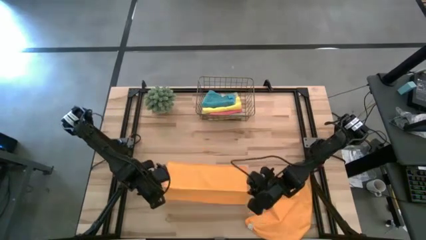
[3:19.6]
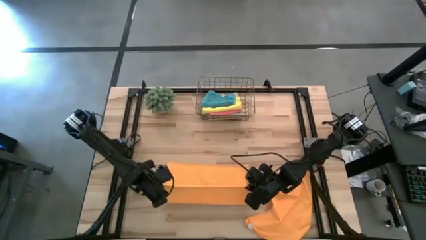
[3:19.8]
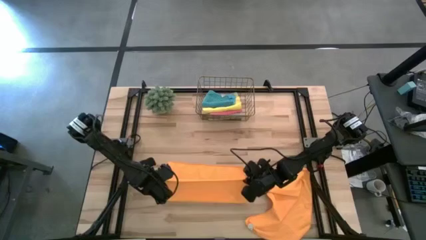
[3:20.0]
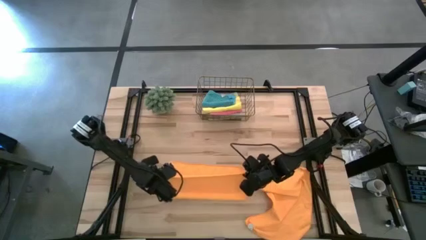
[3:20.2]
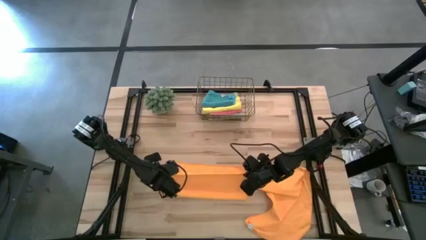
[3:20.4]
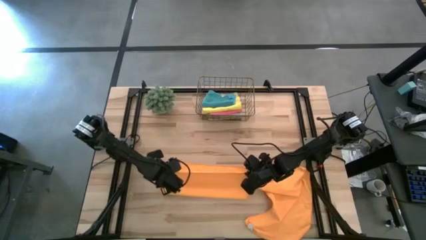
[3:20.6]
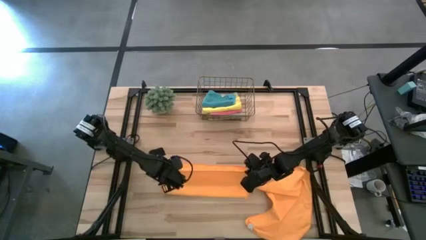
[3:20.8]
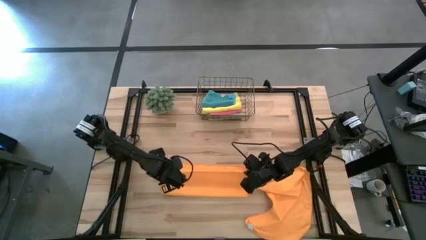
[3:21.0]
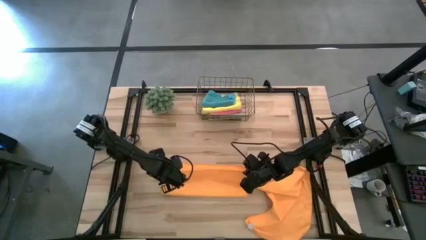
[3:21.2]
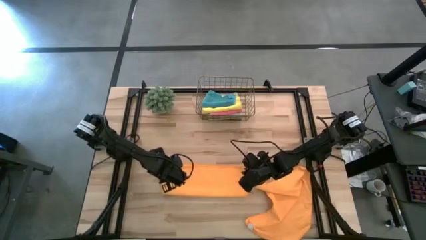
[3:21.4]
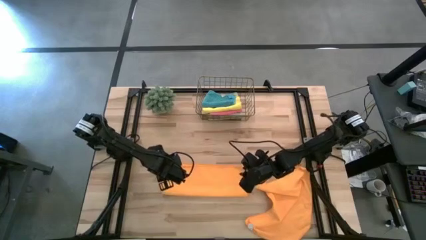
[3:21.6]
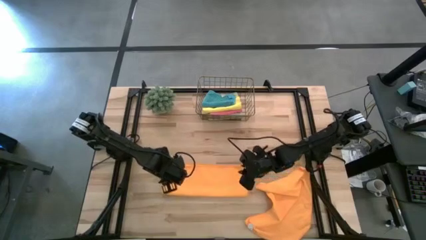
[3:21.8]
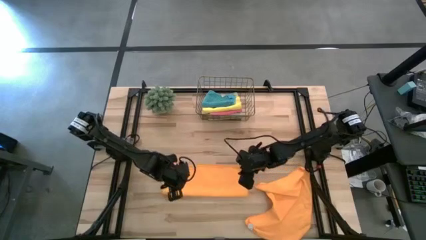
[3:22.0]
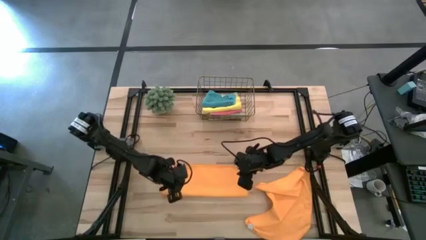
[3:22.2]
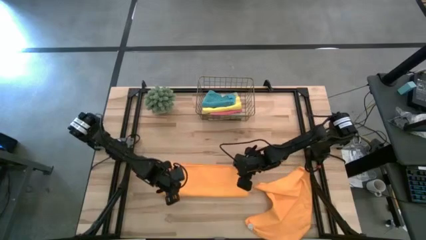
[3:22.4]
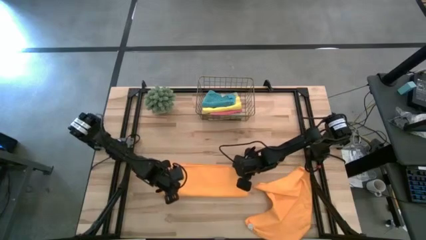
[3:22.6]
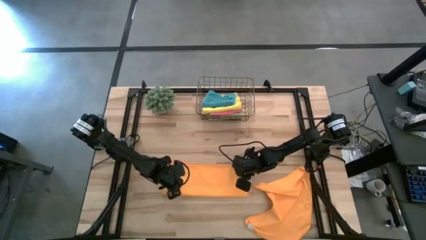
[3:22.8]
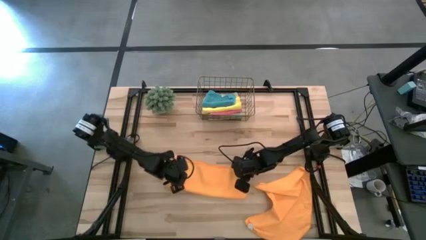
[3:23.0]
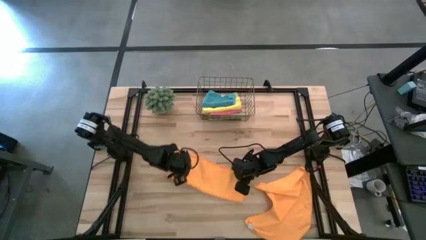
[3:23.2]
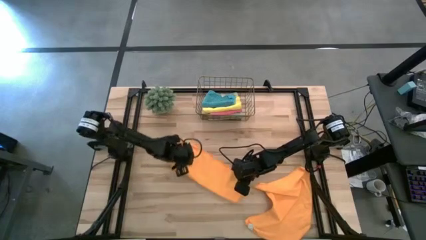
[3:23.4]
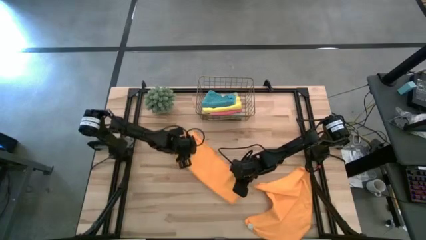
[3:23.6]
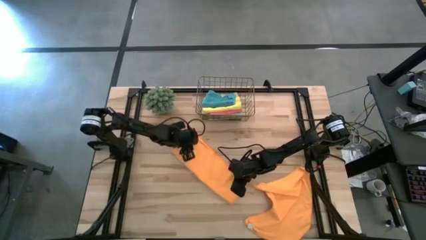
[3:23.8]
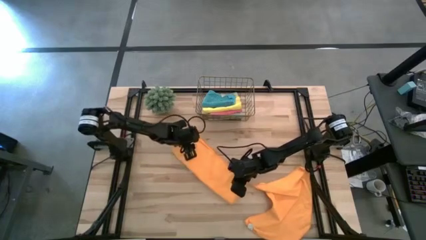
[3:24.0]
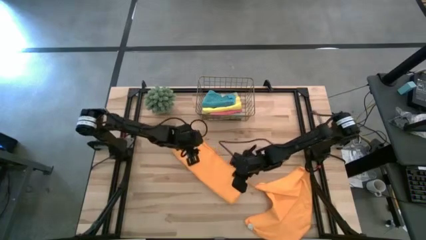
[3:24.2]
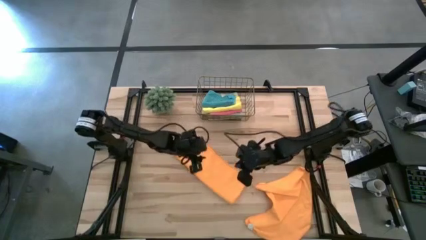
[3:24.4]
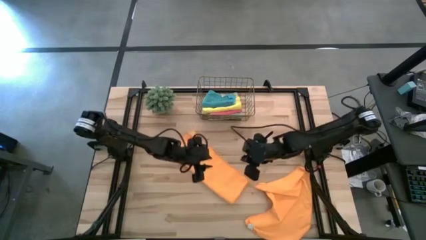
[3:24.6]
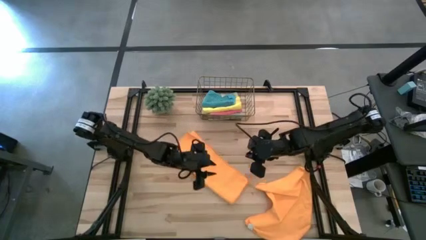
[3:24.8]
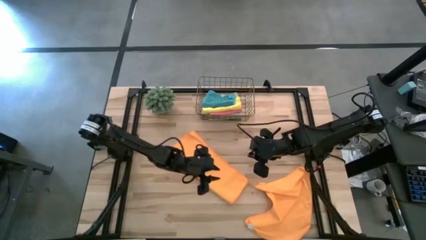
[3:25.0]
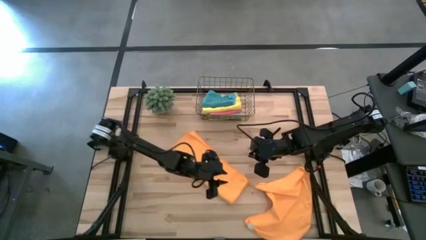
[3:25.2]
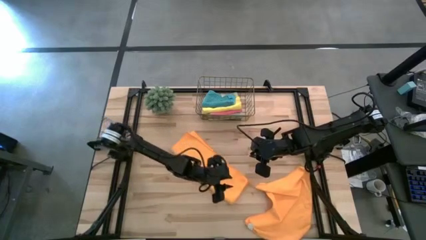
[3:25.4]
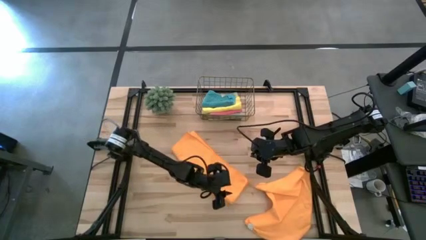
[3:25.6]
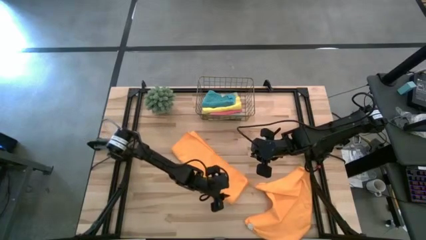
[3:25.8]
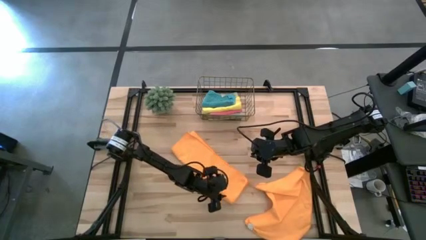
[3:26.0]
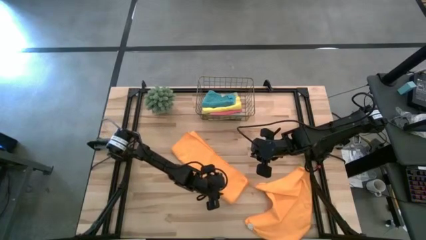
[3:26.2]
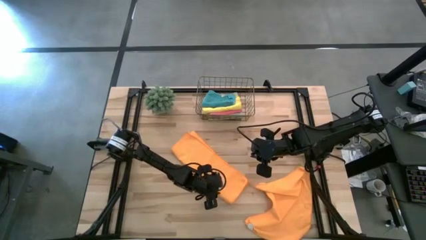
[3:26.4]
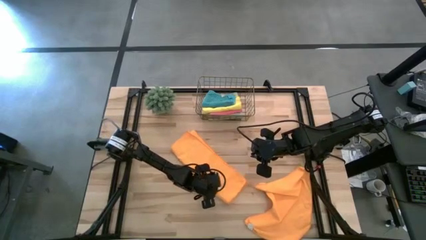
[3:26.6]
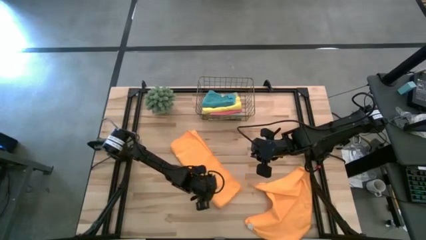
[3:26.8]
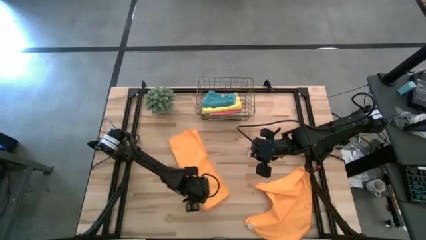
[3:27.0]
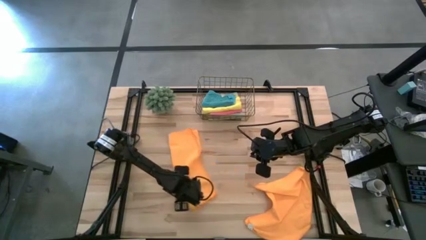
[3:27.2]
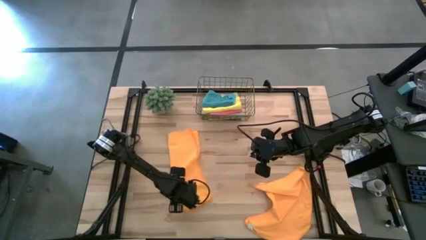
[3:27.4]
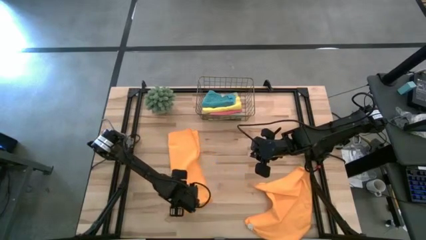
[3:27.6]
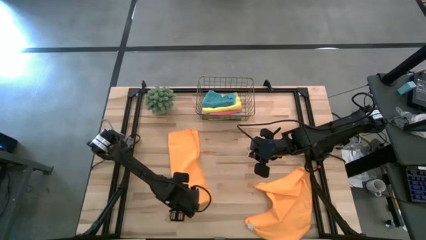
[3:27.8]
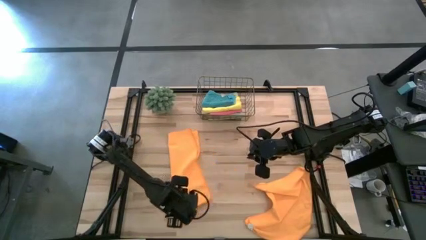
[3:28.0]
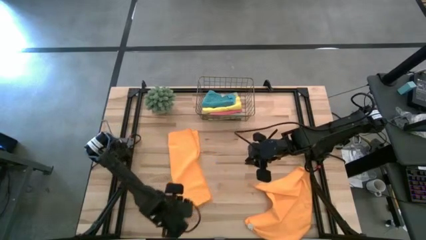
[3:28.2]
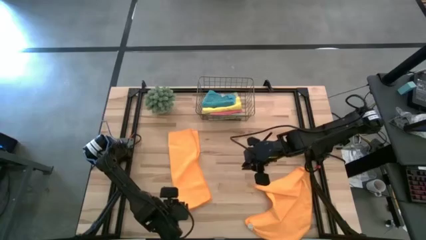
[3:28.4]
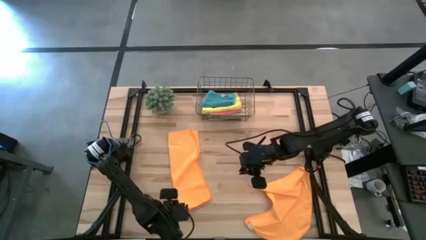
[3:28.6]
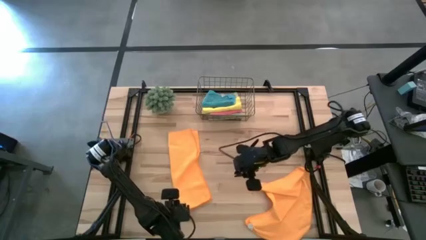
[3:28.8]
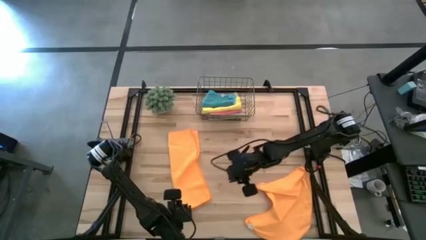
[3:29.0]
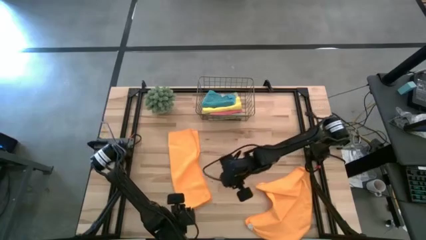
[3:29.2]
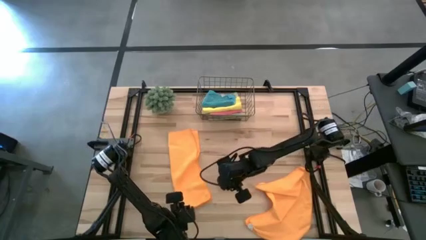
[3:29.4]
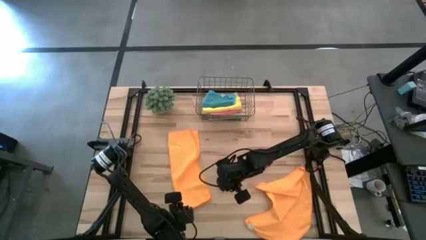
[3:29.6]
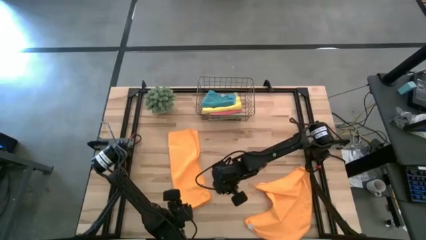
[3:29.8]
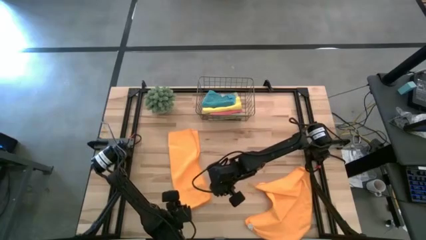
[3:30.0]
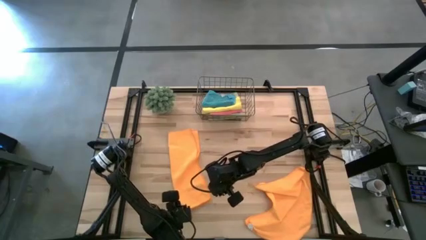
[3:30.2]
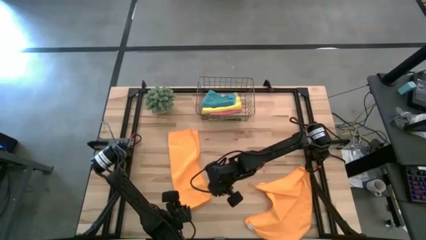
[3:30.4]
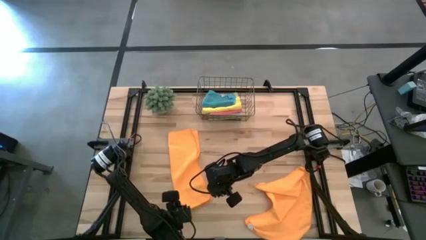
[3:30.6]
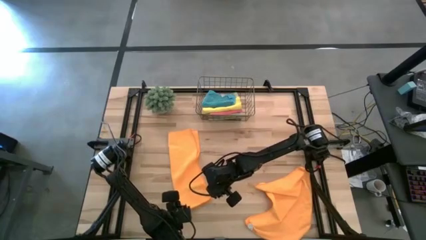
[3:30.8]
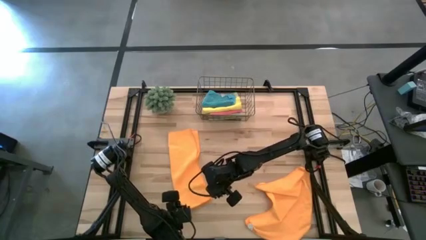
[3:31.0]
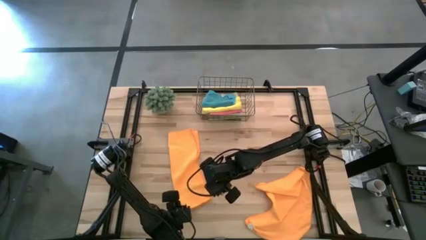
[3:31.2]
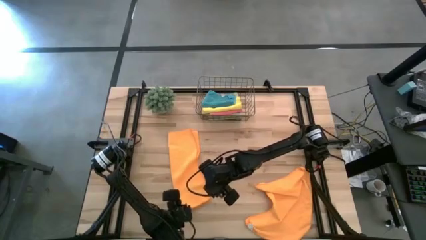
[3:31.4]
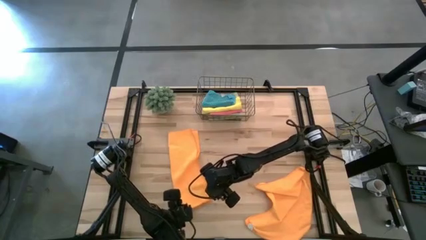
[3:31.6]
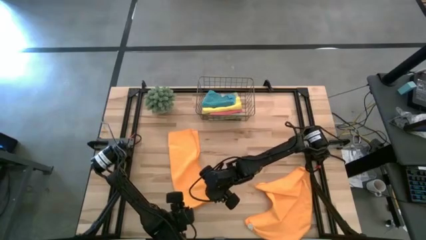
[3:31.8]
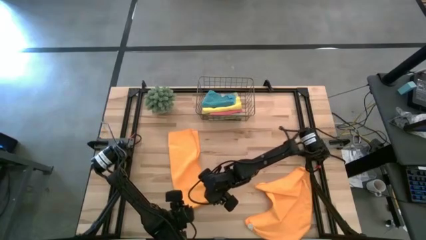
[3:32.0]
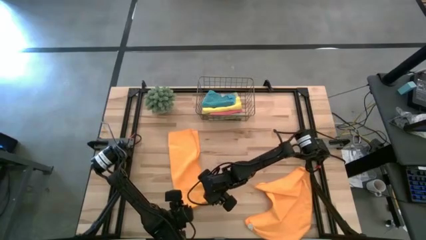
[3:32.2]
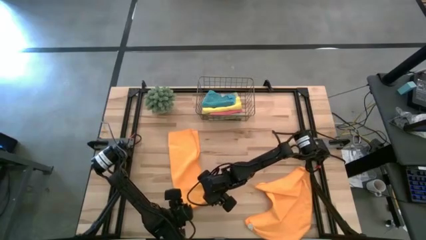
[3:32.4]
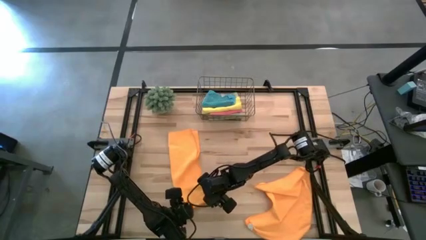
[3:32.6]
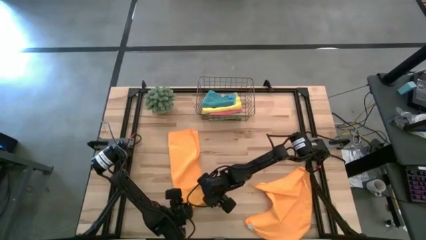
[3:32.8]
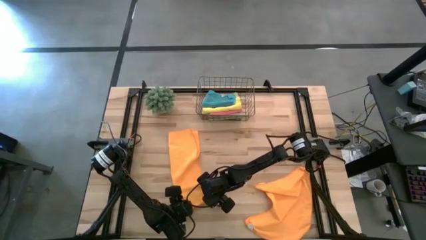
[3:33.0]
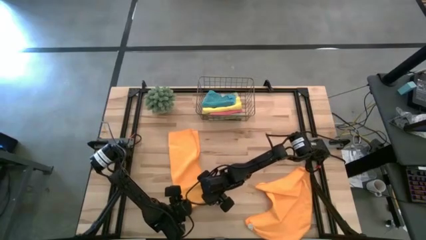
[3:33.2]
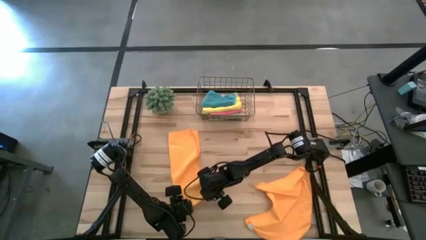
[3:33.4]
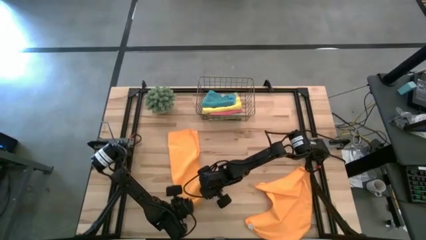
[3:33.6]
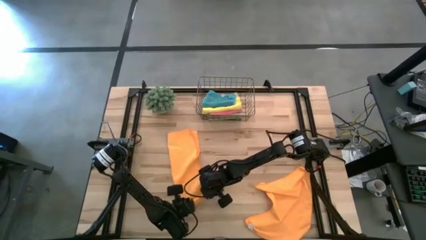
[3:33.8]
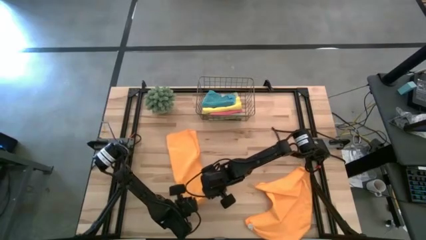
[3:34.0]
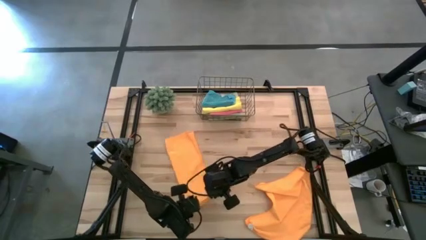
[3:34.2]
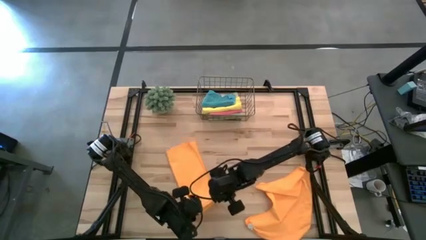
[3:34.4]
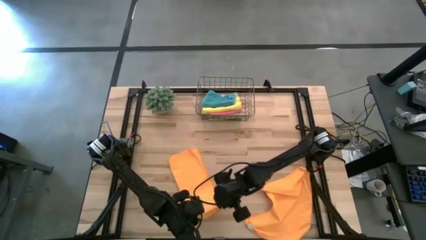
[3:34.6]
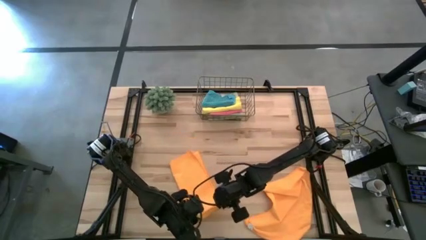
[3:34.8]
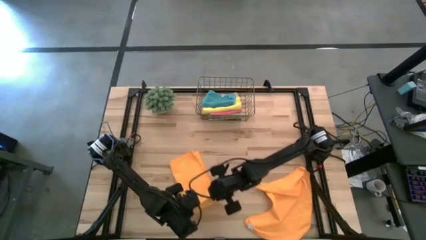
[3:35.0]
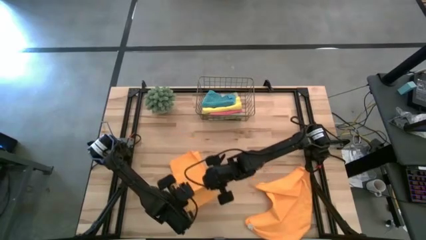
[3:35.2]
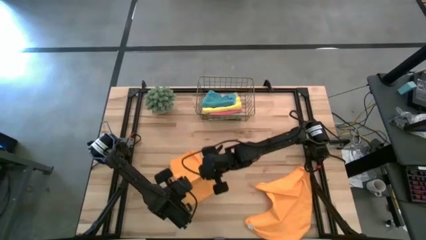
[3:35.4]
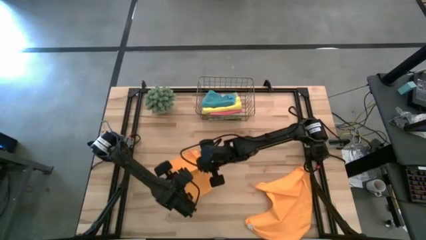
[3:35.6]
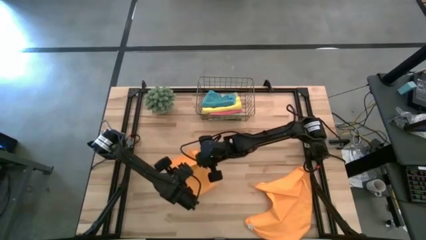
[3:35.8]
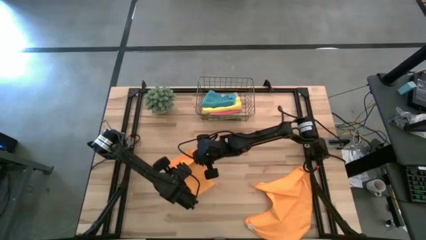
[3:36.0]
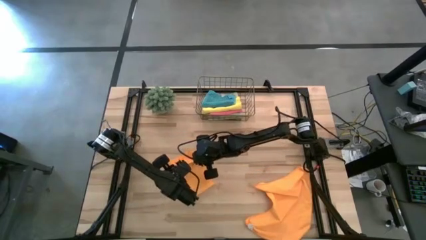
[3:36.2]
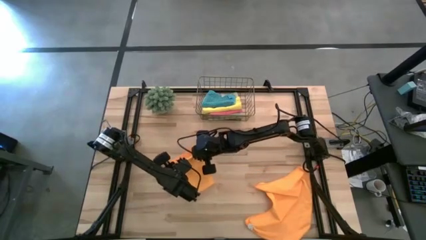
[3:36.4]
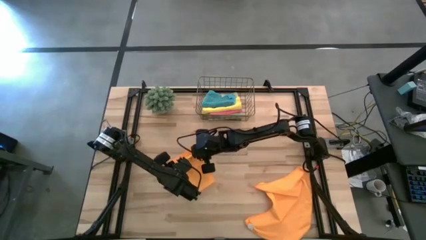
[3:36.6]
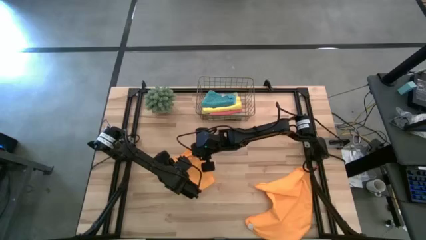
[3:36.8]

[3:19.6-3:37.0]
Task: Fold microfiber towels
Fold the left orange towel
